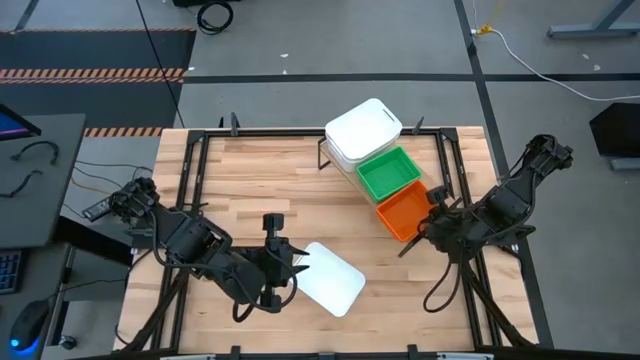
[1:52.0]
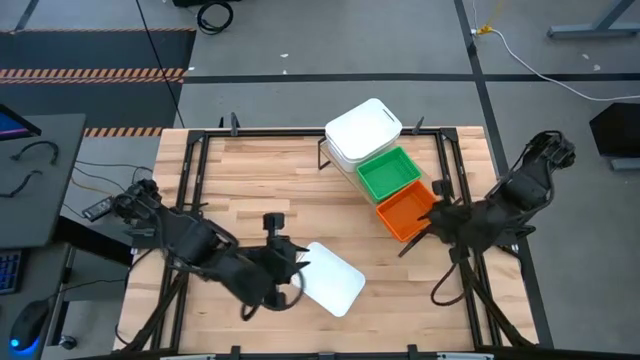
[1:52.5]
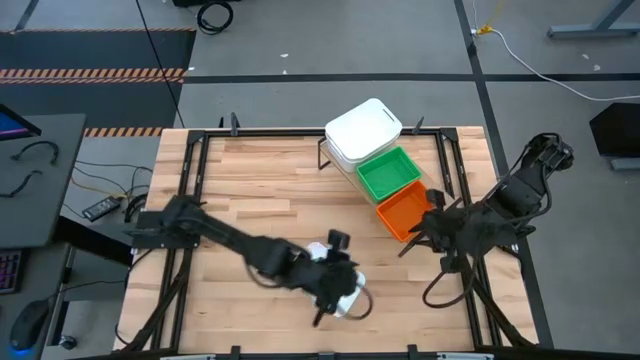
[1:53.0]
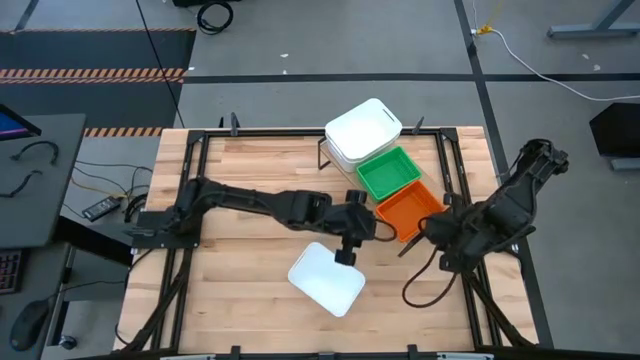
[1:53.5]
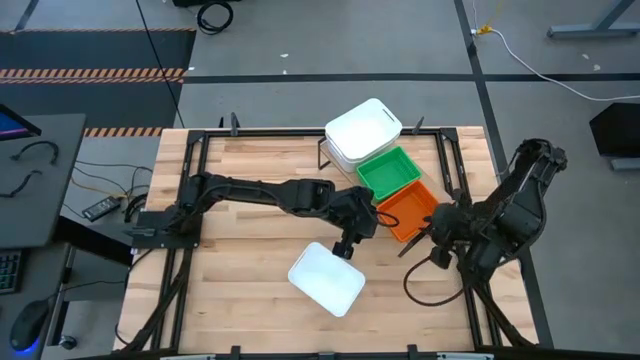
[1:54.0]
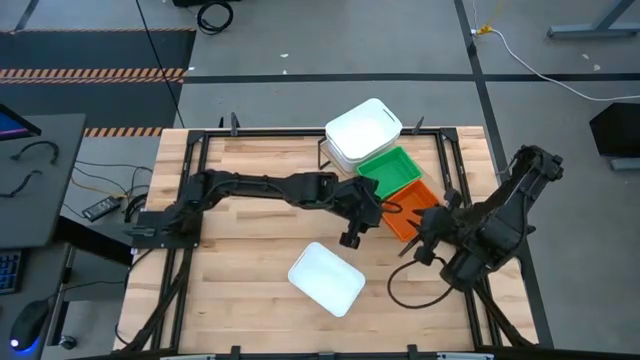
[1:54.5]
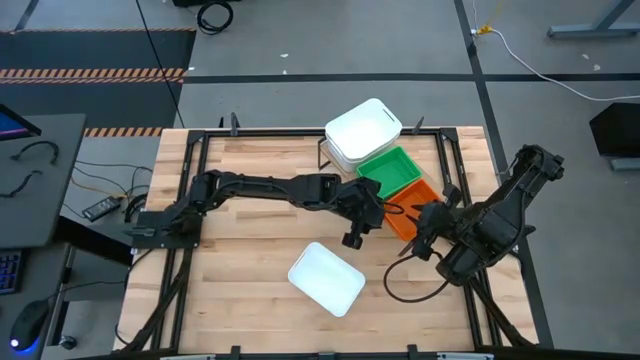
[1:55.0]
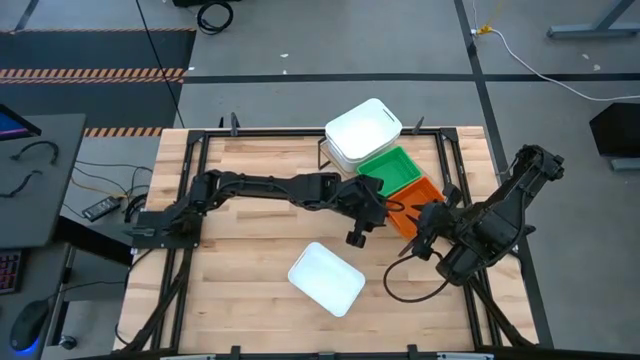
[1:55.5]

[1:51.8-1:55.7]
Task: Stack baskets on shelf by color
Adjust the stacked of orange bins

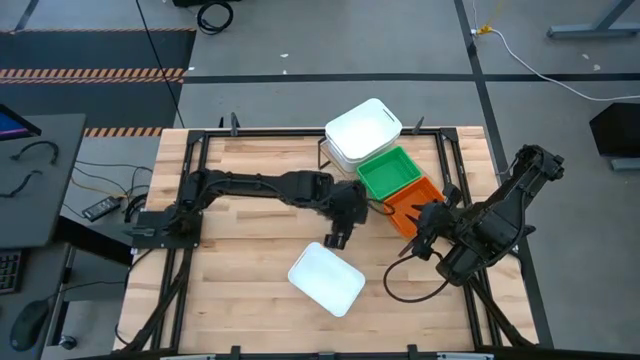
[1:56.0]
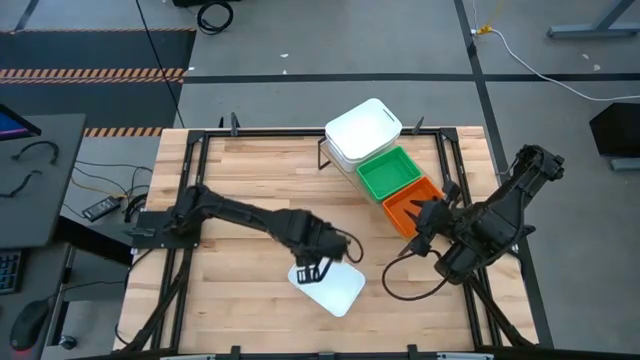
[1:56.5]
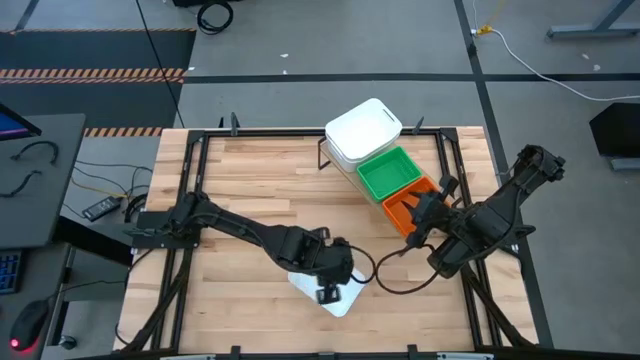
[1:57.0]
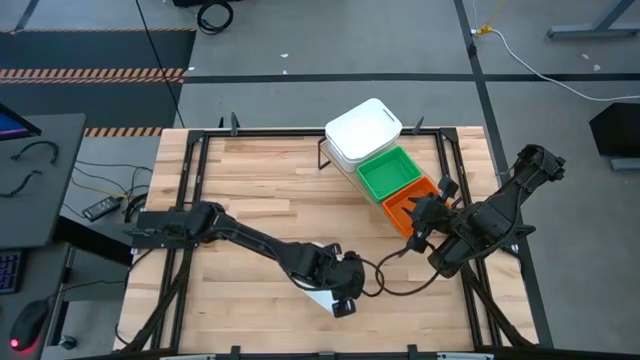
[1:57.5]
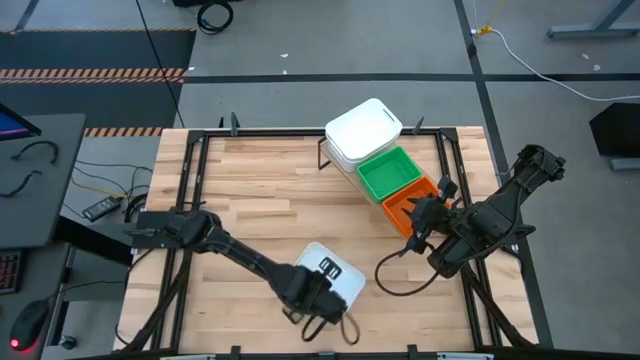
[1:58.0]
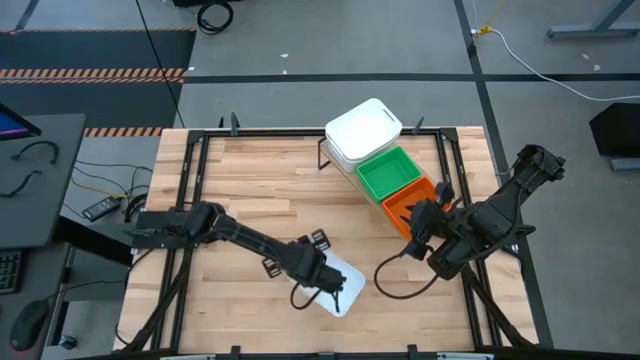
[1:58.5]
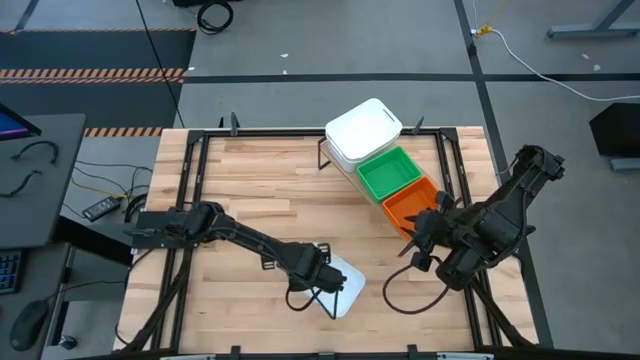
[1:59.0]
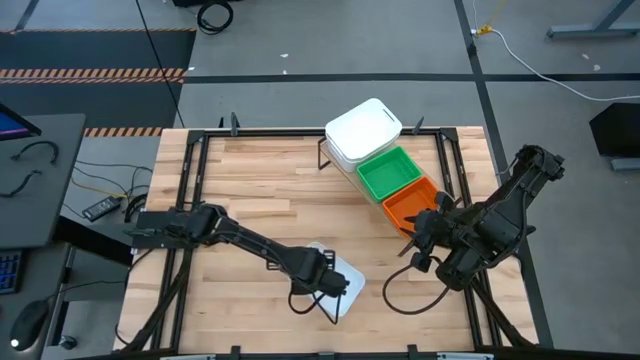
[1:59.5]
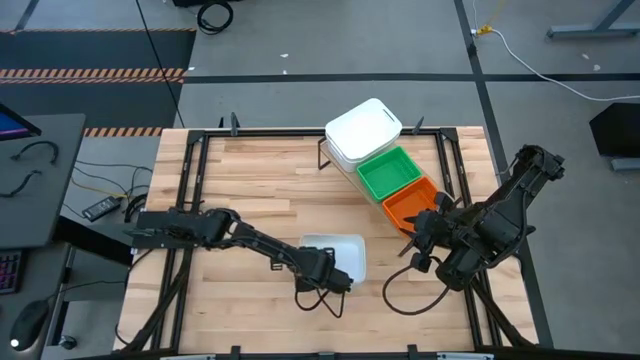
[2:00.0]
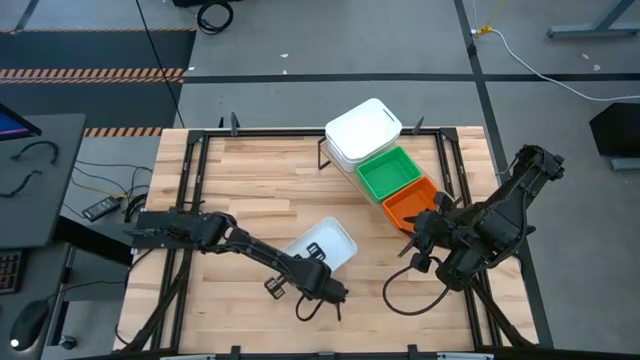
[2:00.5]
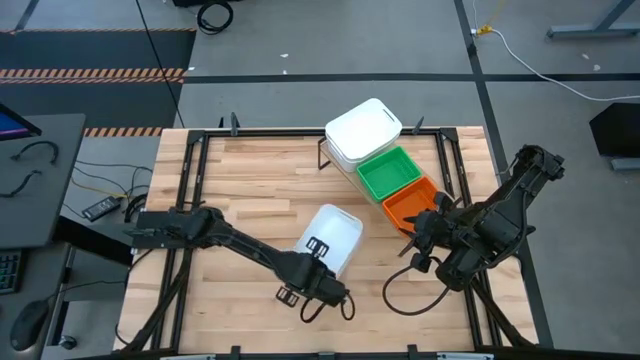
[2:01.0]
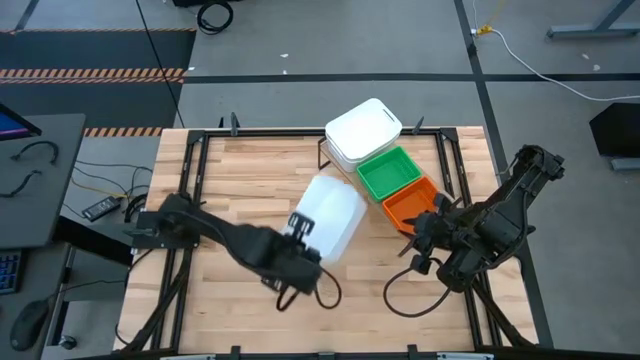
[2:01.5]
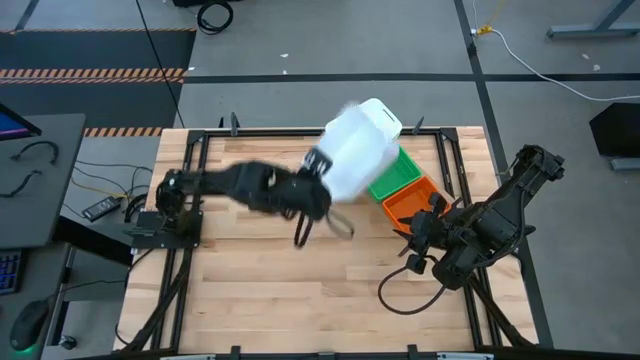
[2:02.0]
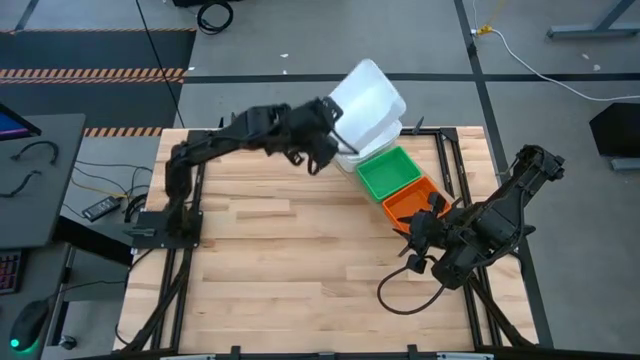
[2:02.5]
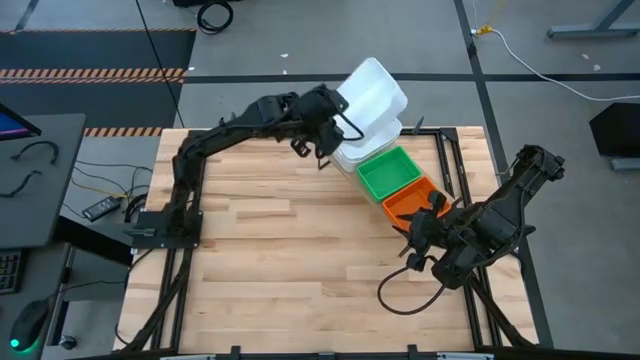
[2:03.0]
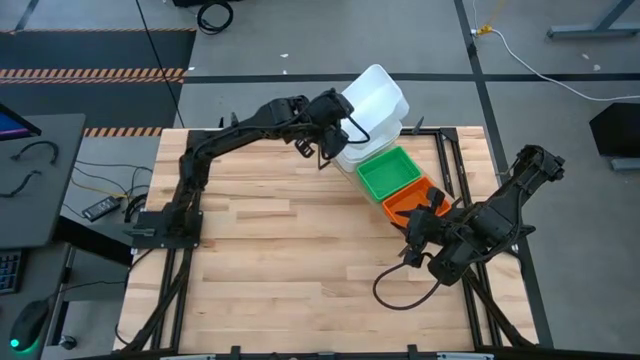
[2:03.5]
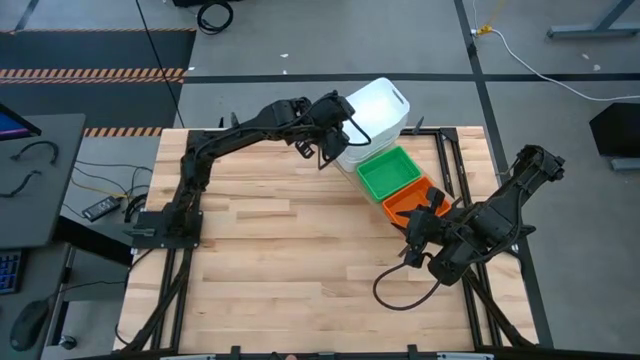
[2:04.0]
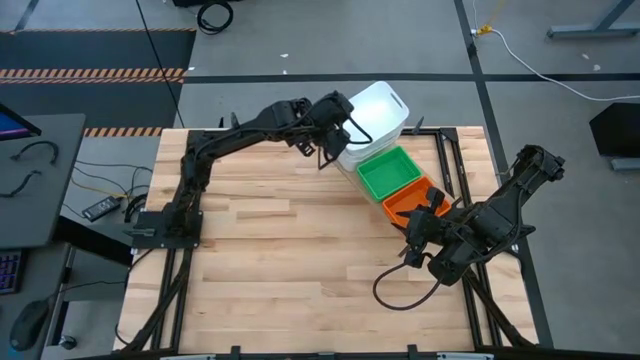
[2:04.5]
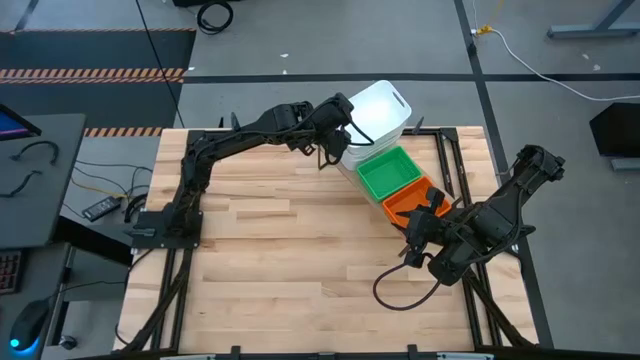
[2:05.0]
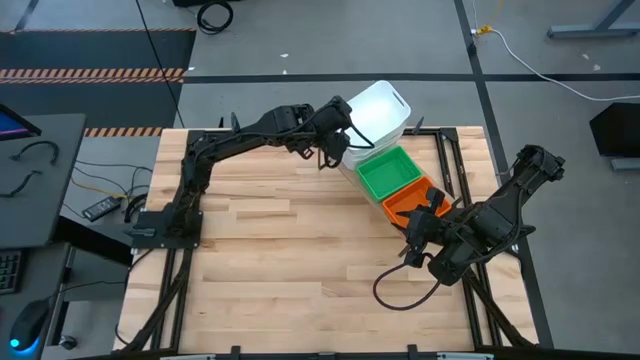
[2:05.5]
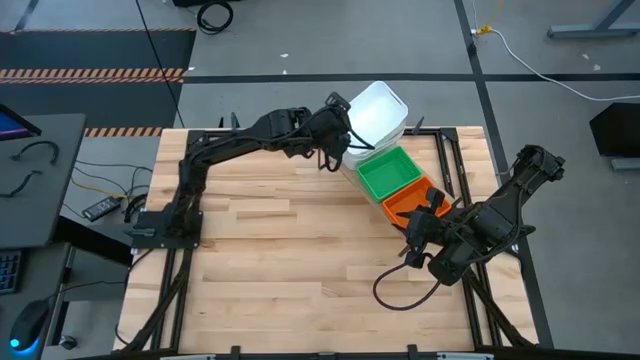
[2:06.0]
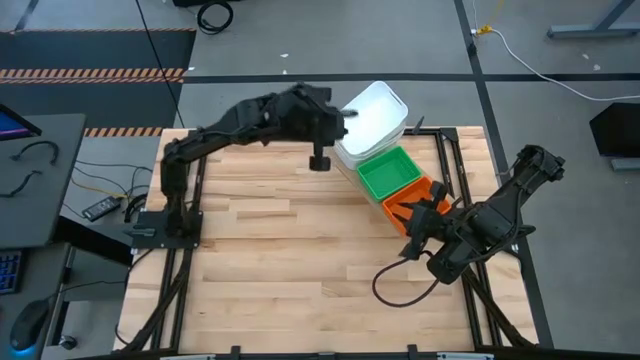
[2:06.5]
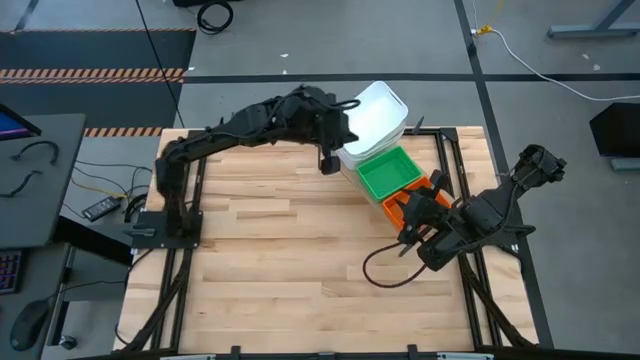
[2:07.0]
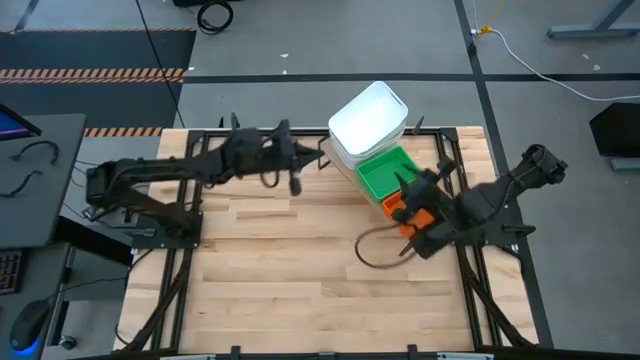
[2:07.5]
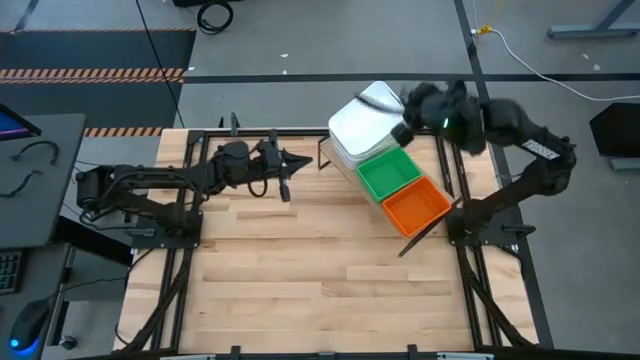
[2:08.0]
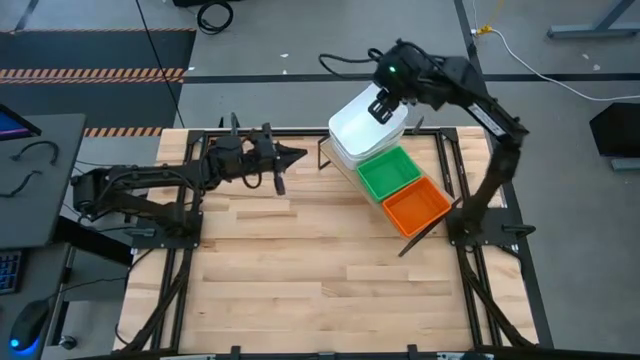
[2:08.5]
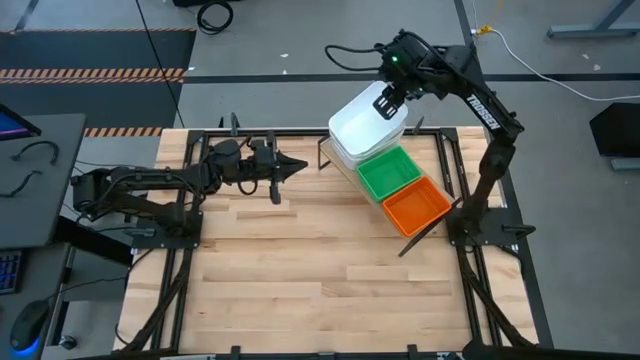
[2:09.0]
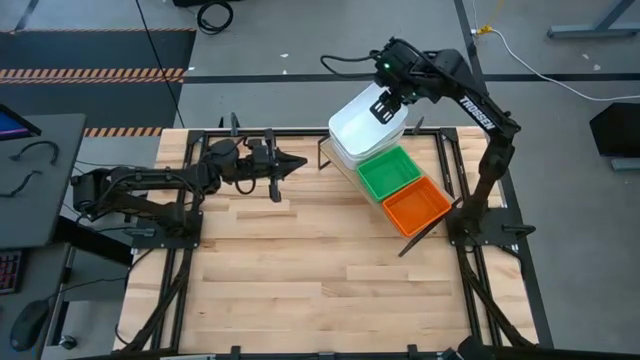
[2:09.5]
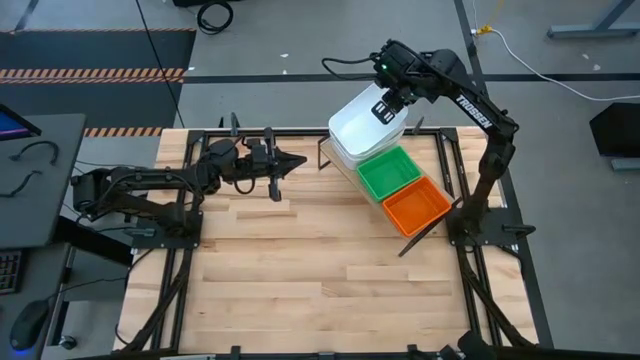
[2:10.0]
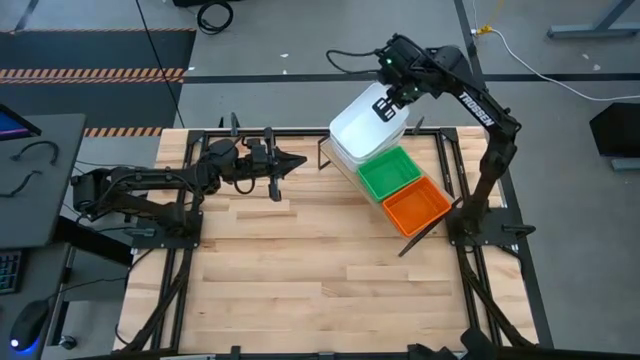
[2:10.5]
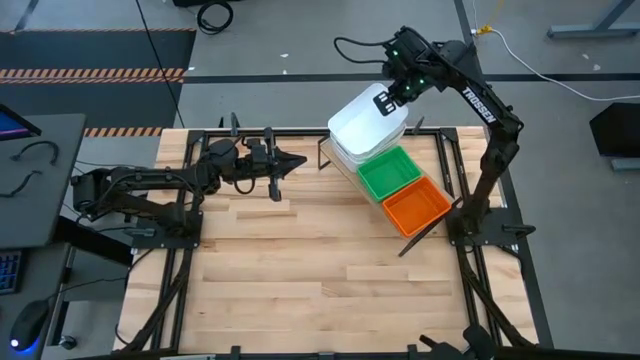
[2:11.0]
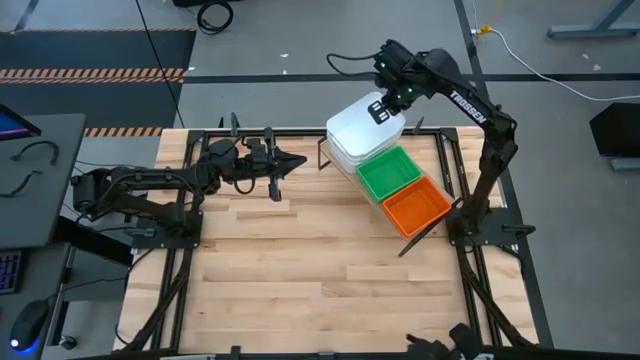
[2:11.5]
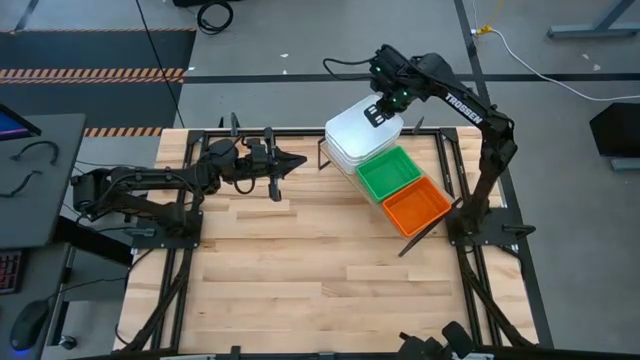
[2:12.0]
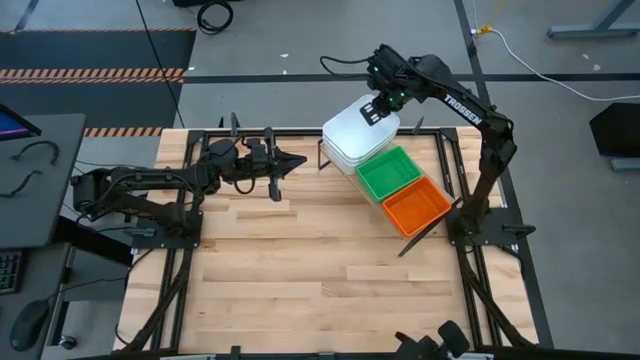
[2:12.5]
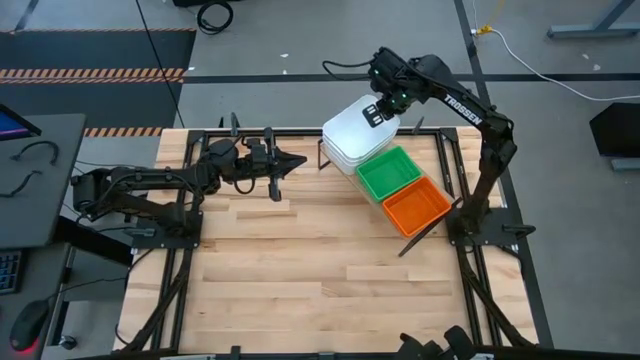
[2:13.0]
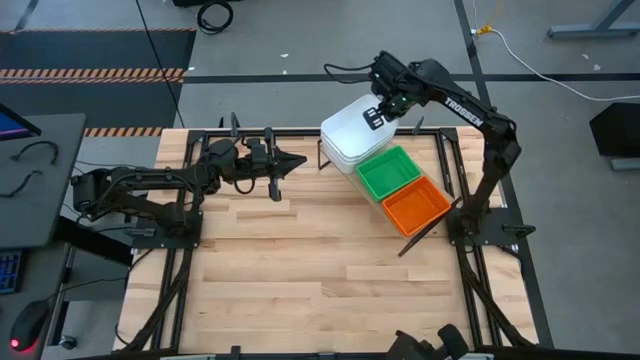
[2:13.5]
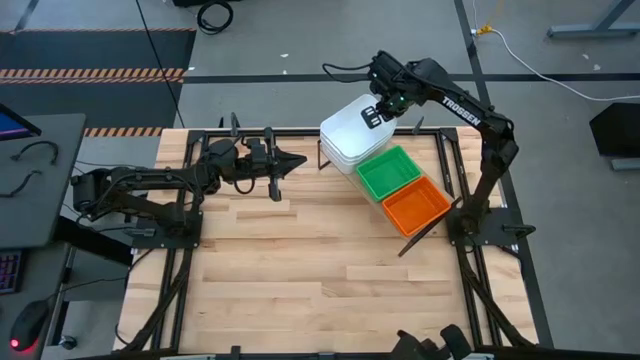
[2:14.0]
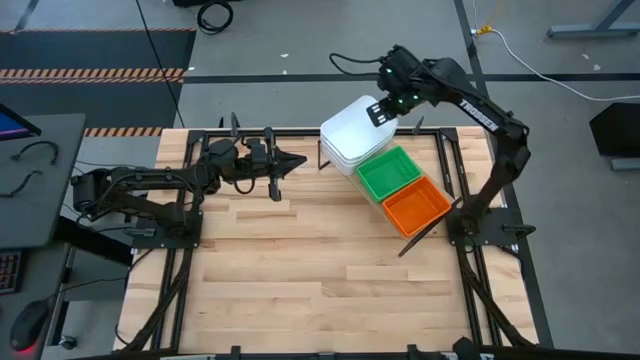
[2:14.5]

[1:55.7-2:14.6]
Stack the white bin on top of the white bin on the shelf
